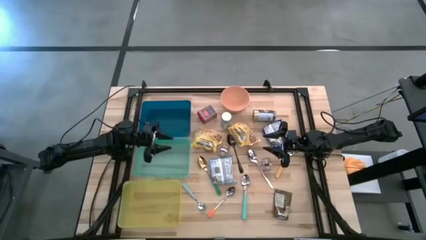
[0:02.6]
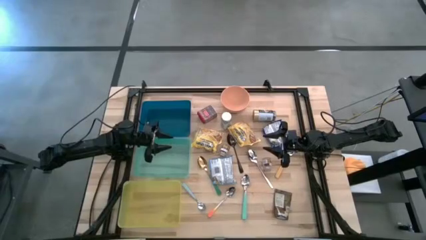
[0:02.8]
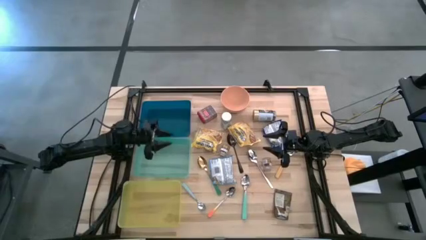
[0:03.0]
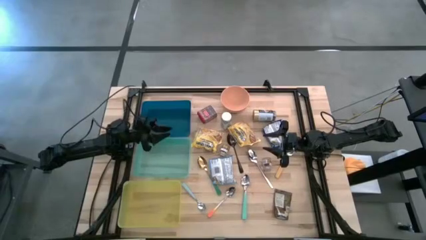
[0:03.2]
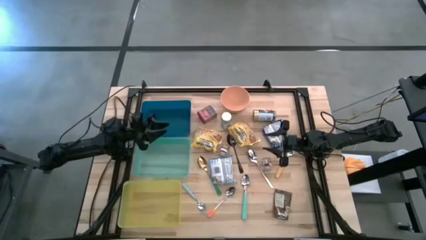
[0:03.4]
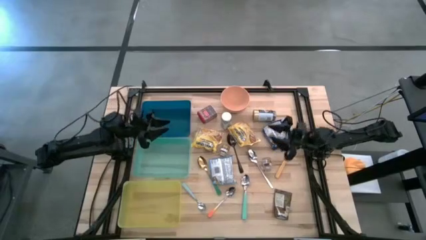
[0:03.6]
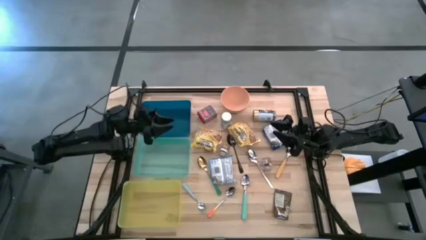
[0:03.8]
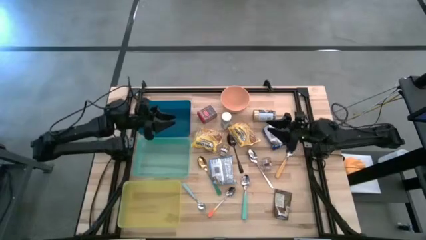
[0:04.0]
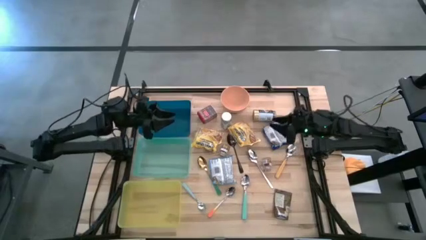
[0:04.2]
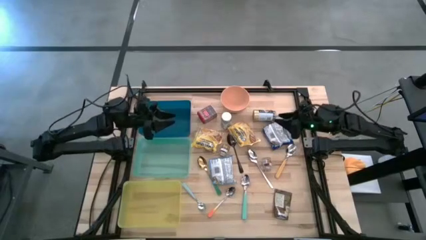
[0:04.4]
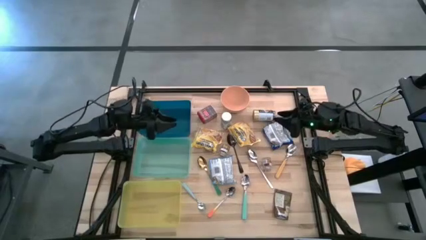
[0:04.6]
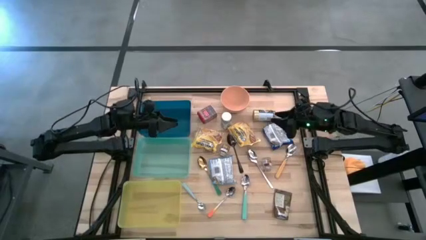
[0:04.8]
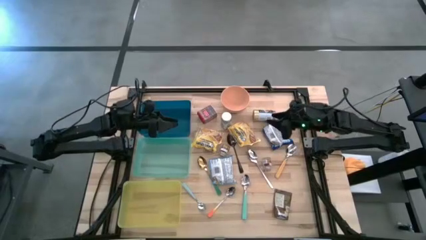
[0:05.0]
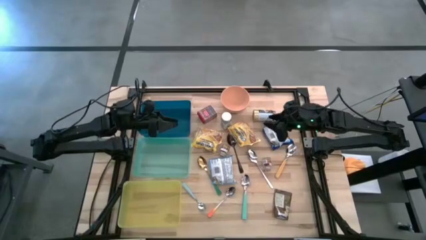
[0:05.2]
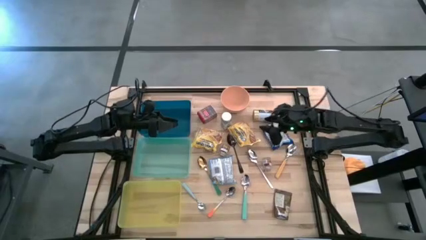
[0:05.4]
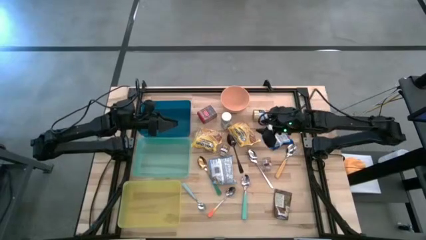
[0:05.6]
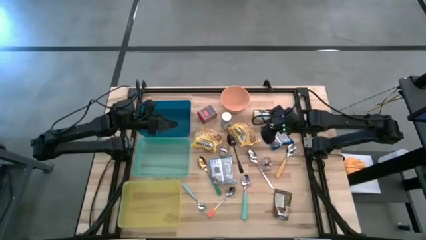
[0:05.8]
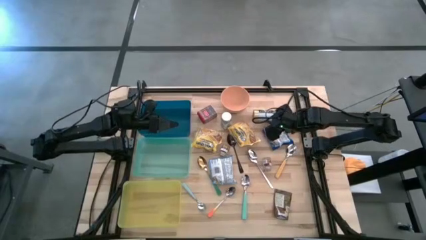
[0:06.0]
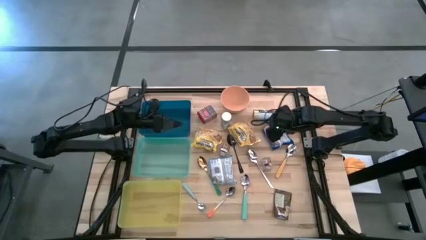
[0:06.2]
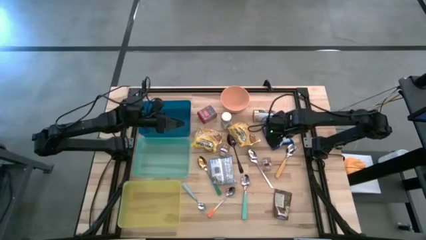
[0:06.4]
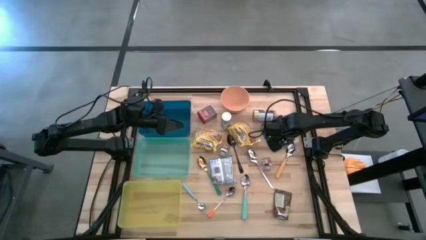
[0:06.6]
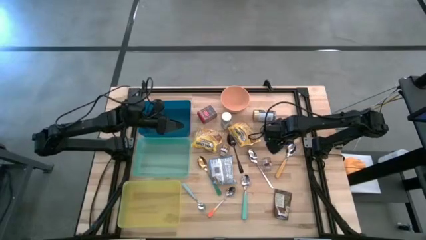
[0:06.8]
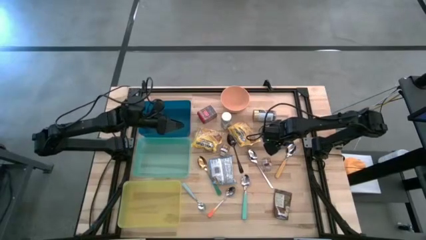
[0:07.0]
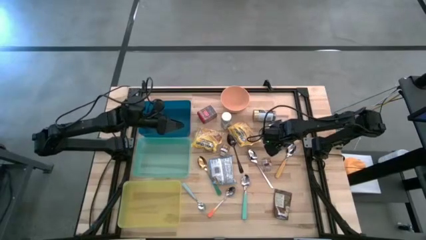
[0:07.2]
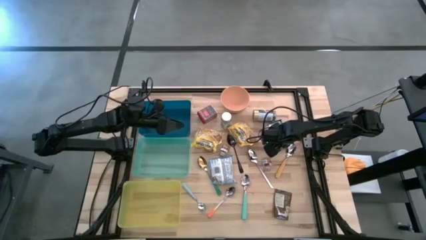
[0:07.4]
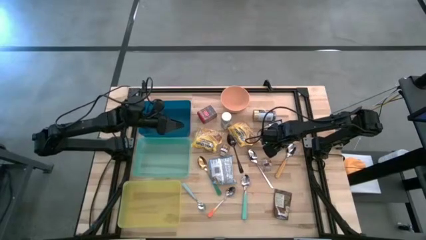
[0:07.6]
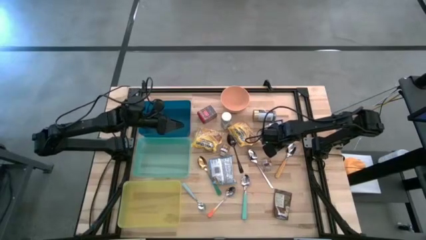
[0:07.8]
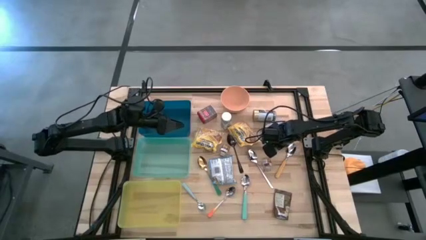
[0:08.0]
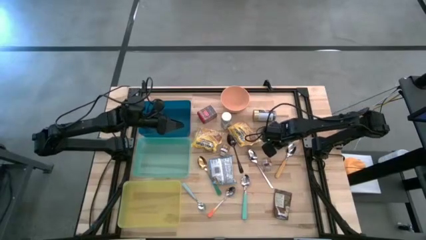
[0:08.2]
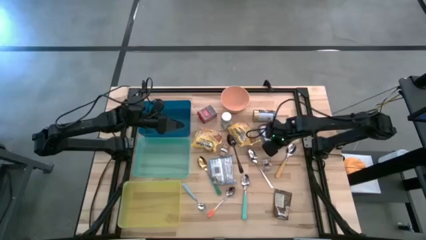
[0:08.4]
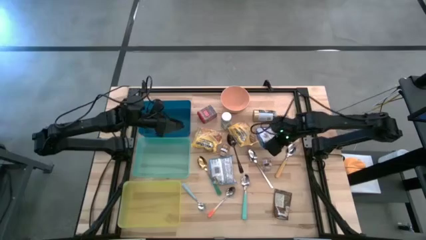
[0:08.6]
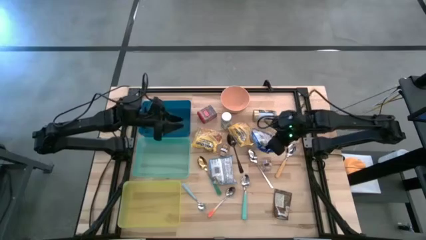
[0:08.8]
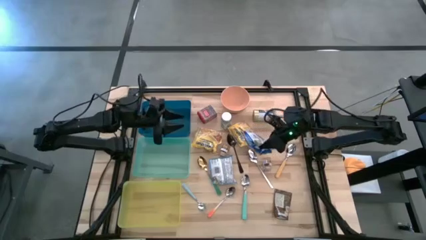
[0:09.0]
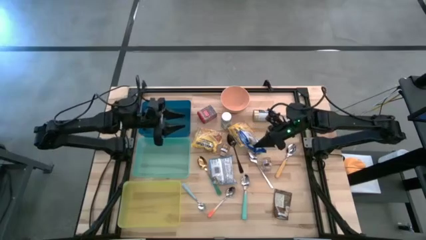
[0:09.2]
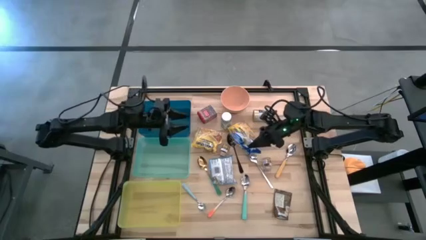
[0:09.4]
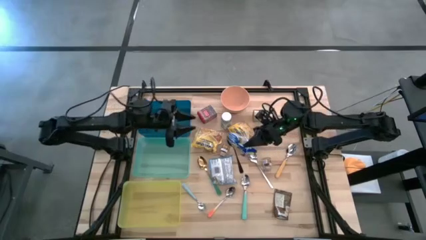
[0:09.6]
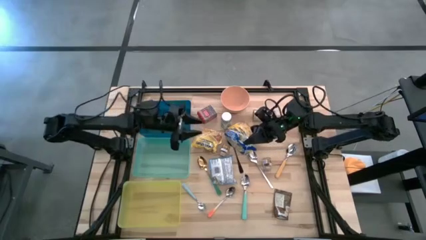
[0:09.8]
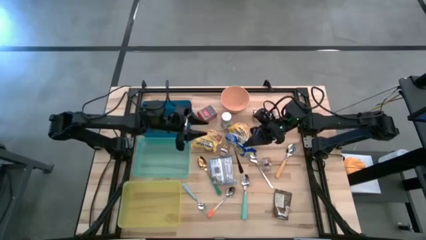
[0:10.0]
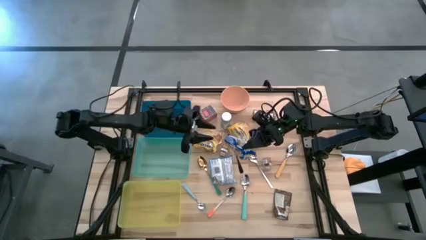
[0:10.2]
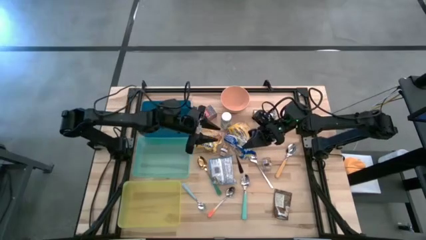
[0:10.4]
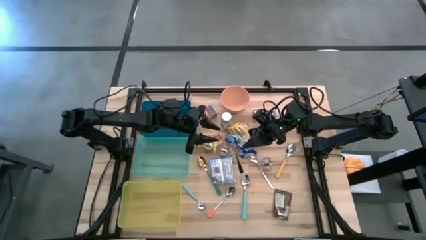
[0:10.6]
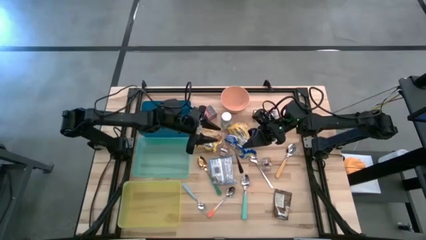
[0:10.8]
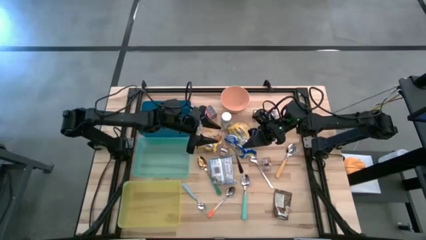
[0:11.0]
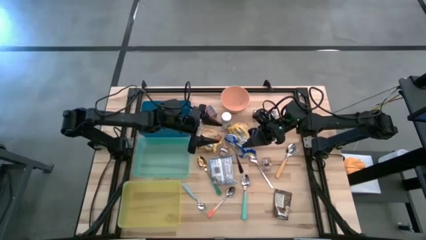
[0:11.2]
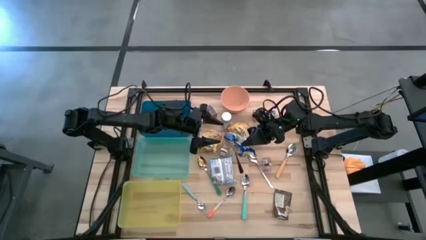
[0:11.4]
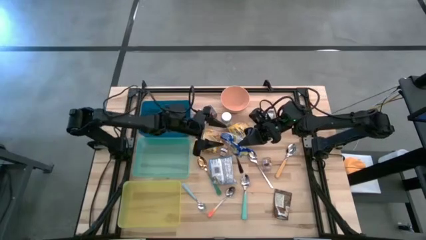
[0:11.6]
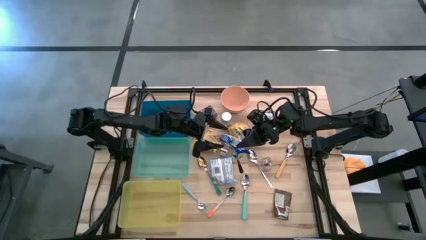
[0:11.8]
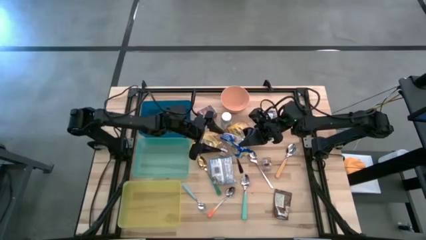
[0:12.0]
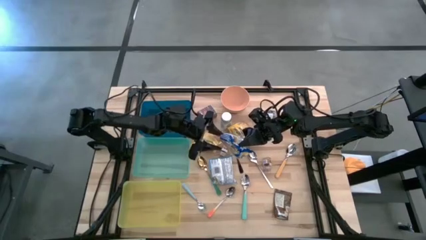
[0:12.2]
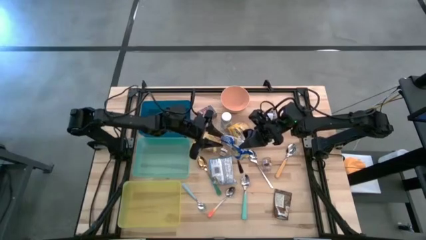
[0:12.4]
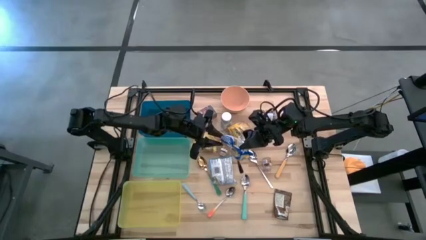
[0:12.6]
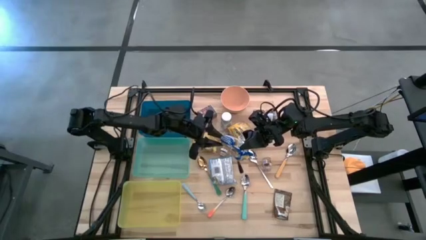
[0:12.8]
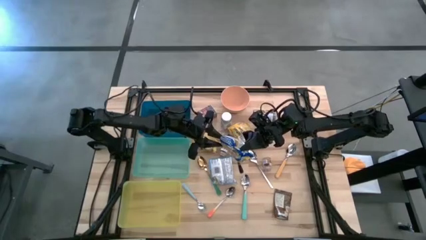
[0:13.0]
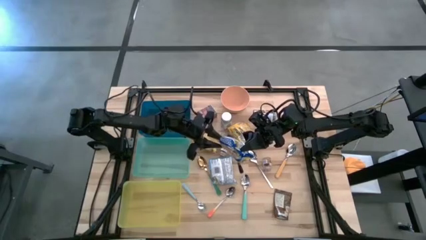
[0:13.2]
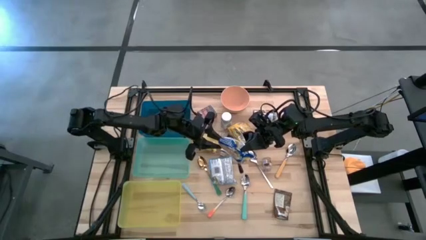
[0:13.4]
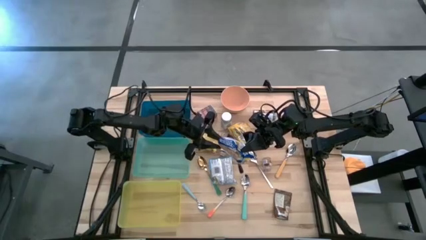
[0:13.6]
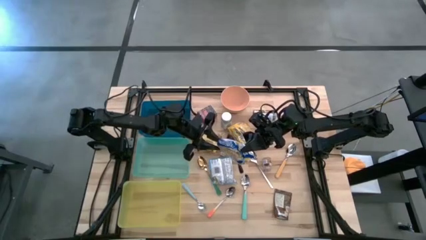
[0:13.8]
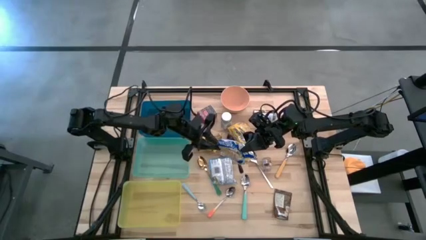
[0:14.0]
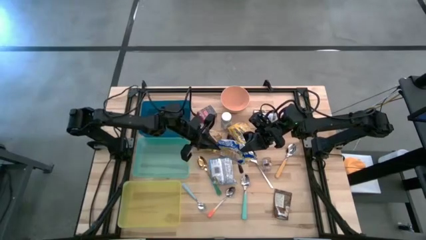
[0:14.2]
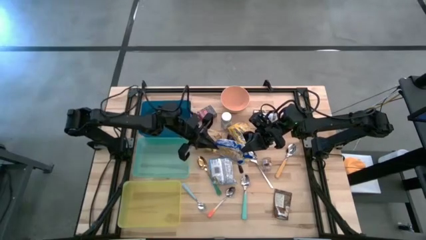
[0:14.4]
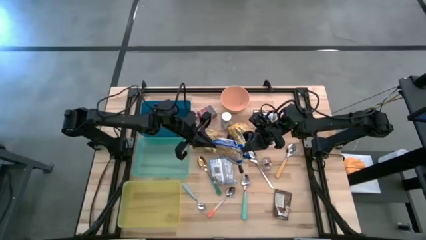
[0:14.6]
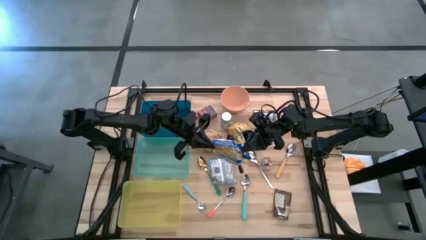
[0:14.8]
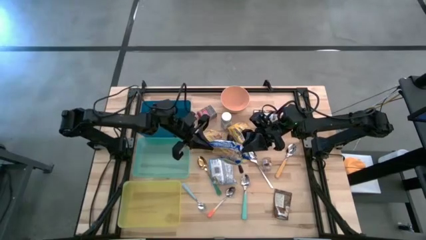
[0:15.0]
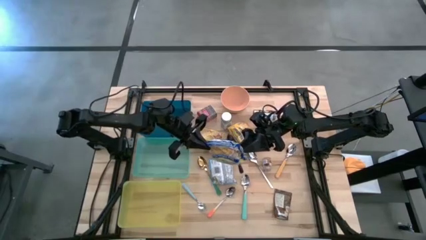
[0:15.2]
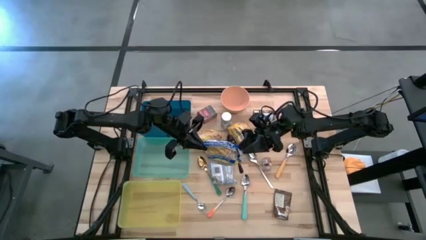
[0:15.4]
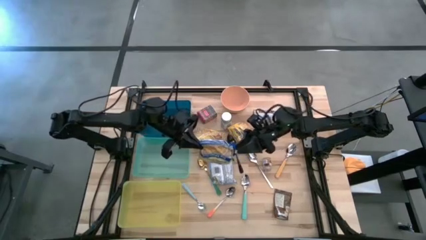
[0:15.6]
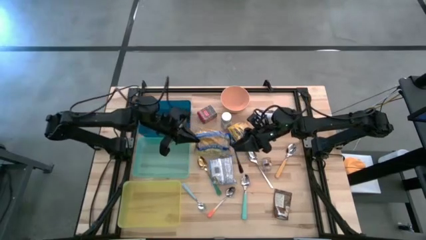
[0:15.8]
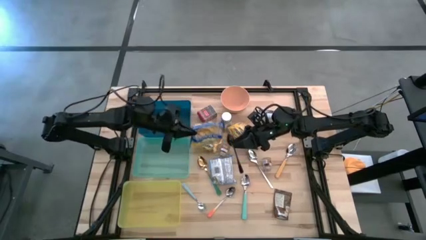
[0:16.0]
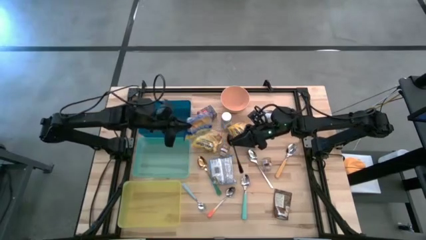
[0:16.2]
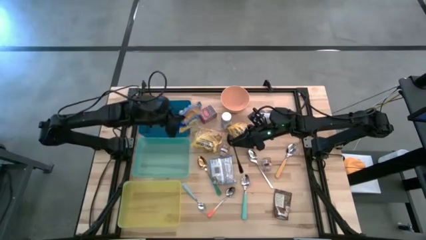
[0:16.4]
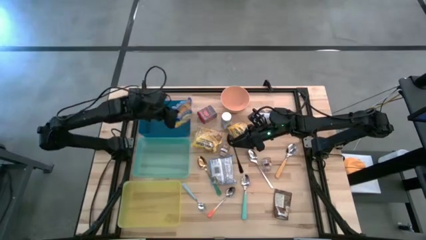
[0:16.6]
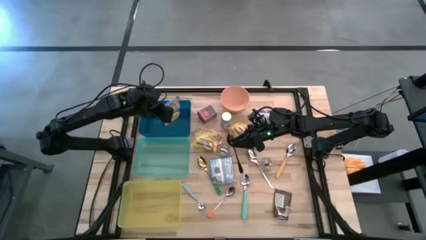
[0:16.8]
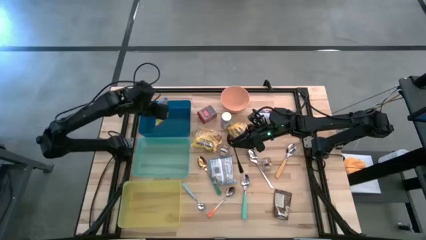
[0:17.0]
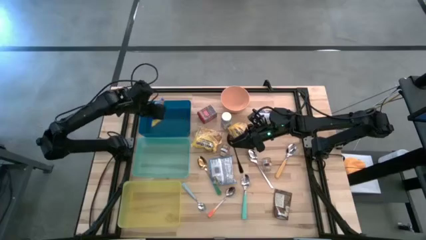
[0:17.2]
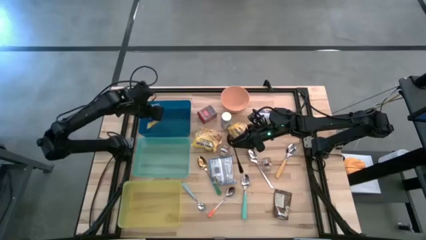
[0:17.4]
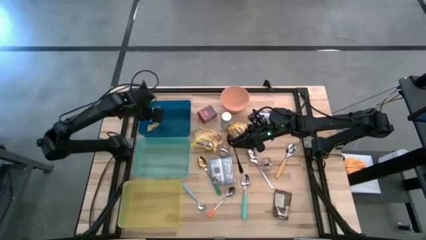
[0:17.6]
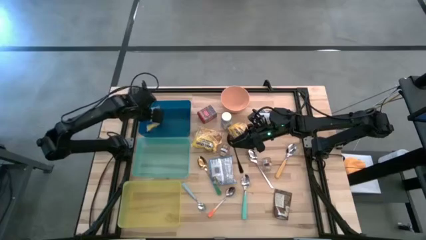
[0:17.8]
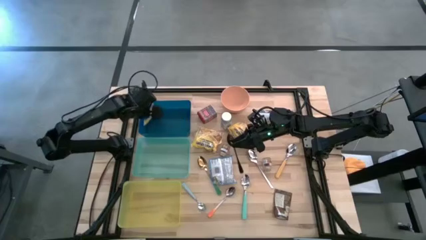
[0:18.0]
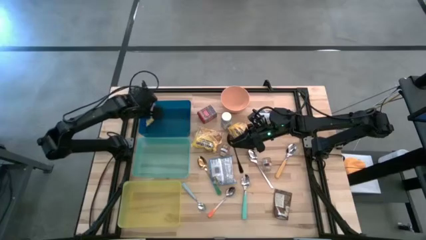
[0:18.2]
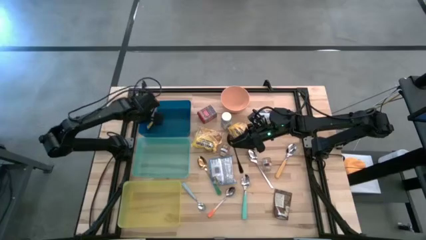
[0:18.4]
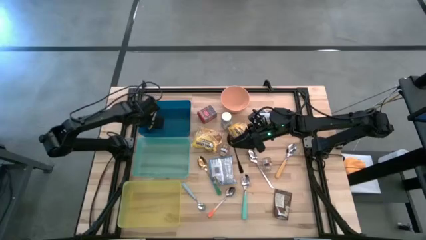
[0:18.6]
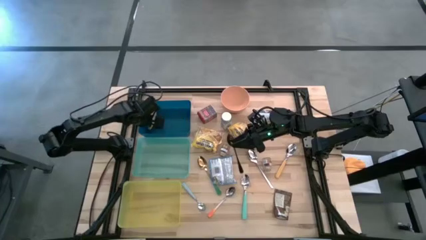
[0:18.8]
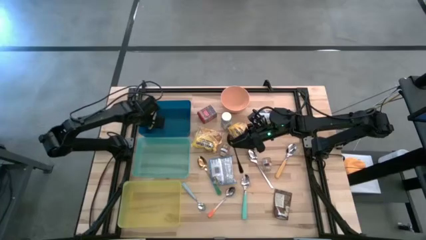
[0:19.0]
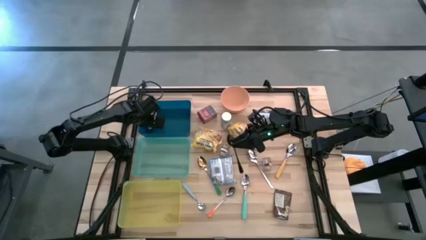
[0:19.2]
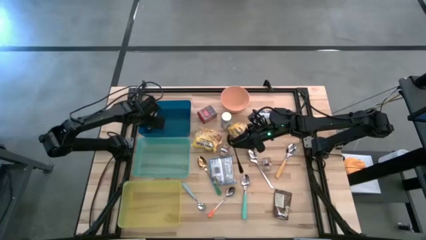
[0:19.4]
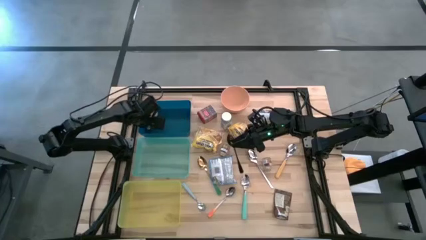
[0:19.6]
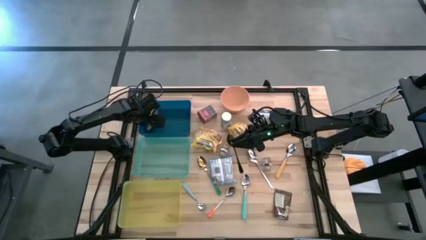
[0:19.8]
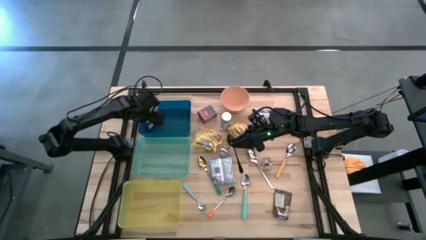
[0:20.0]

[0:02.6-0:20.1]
Put the right blue noodles packet into the blue bin
